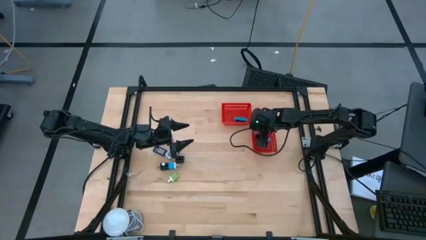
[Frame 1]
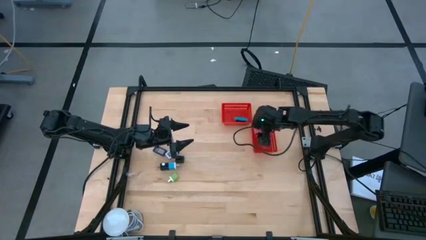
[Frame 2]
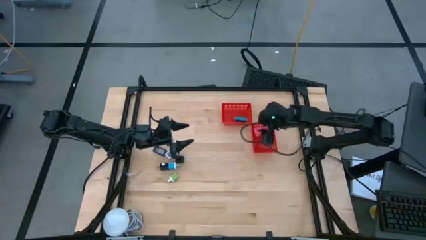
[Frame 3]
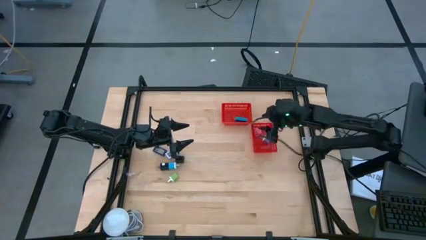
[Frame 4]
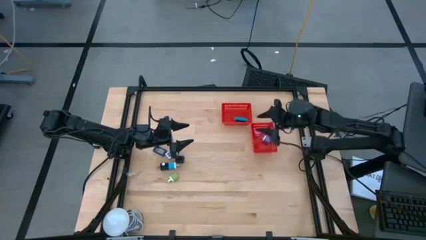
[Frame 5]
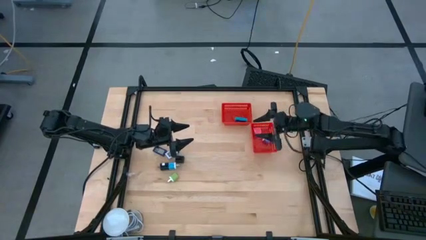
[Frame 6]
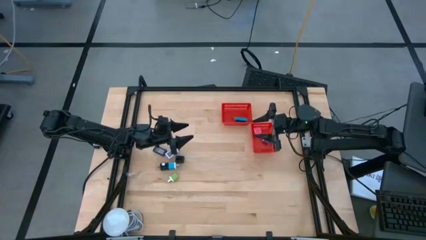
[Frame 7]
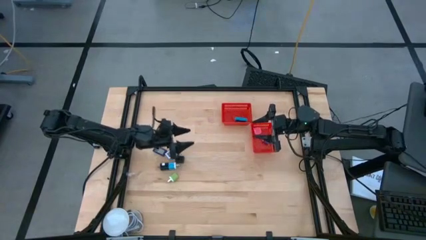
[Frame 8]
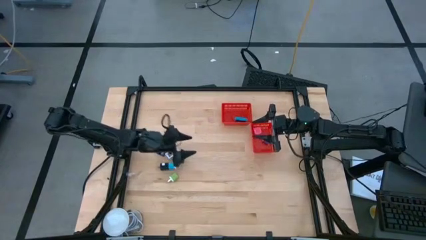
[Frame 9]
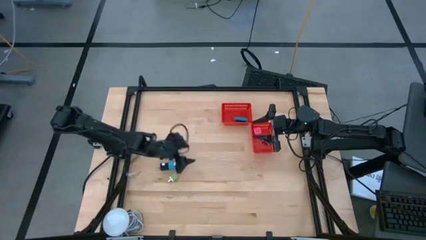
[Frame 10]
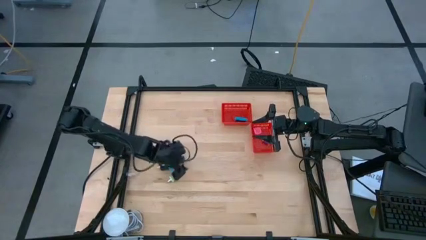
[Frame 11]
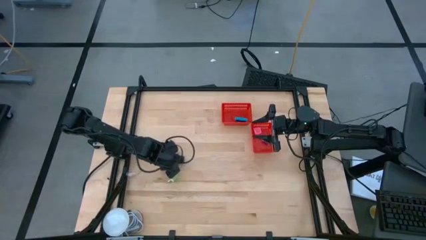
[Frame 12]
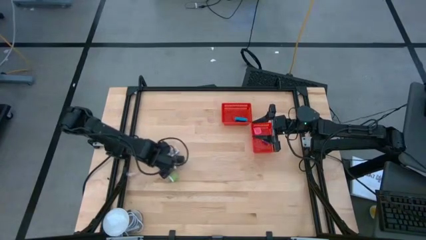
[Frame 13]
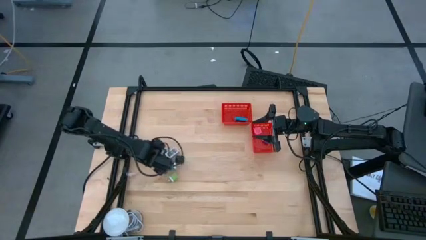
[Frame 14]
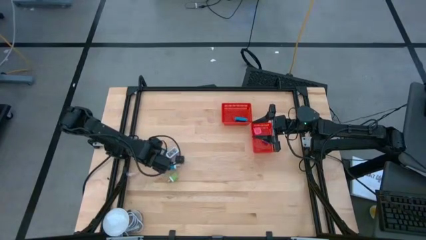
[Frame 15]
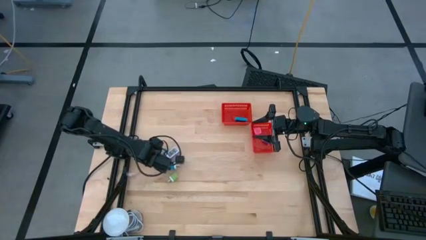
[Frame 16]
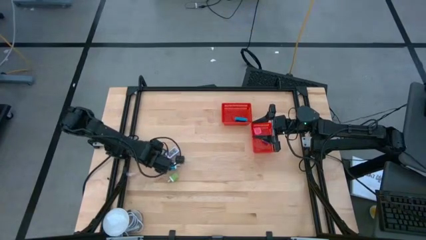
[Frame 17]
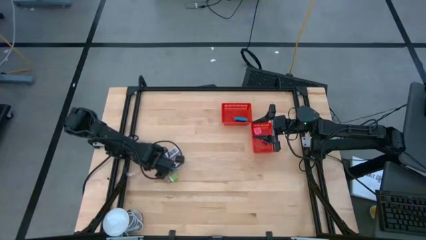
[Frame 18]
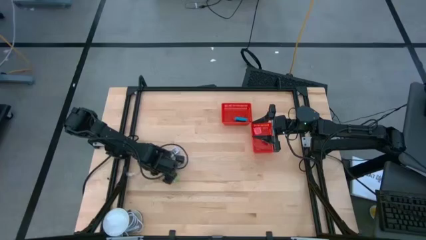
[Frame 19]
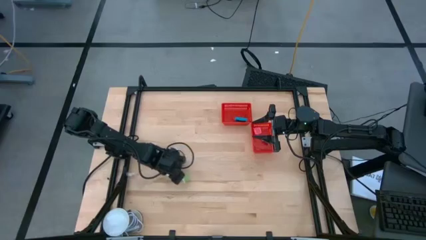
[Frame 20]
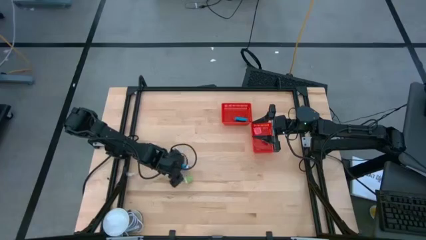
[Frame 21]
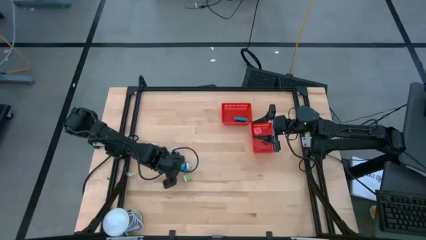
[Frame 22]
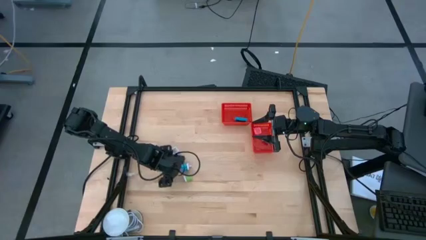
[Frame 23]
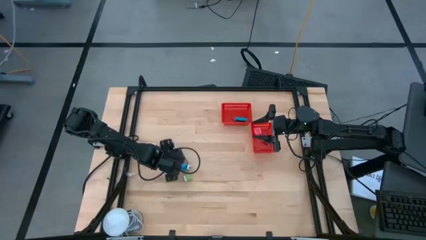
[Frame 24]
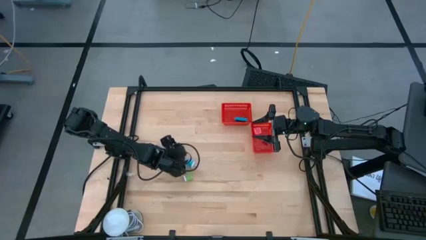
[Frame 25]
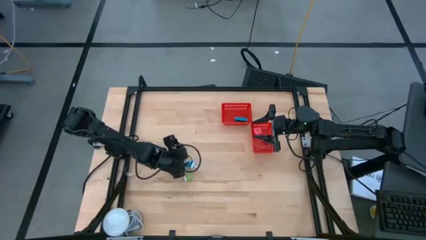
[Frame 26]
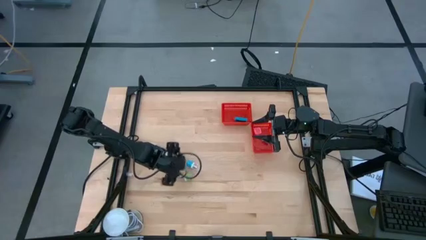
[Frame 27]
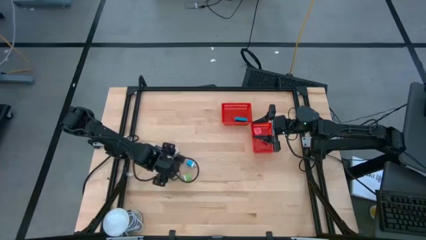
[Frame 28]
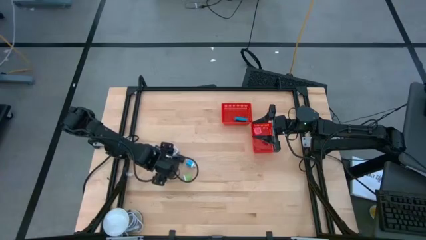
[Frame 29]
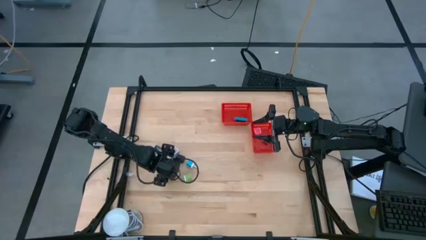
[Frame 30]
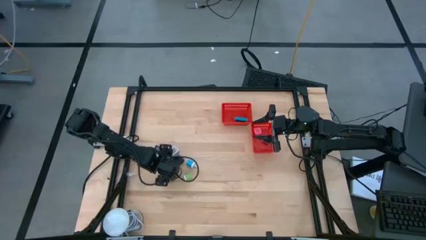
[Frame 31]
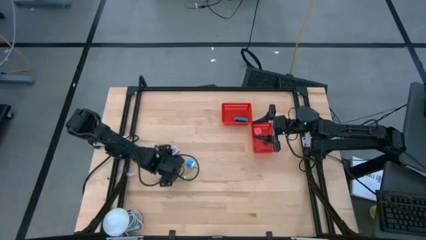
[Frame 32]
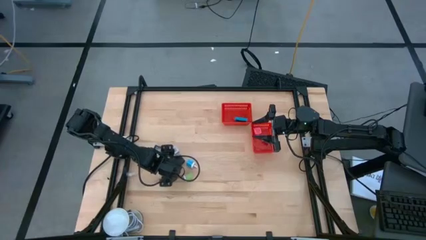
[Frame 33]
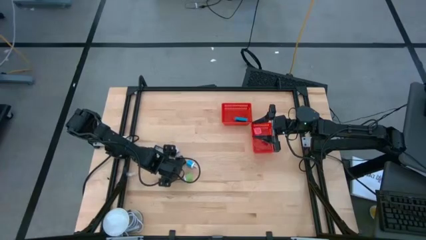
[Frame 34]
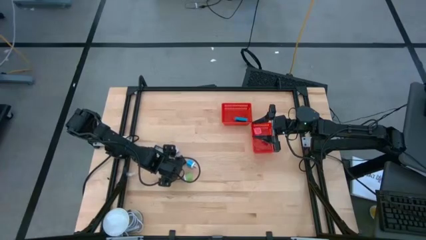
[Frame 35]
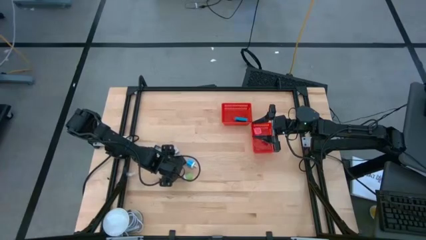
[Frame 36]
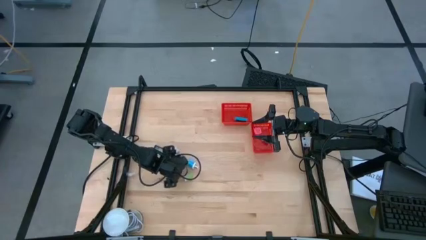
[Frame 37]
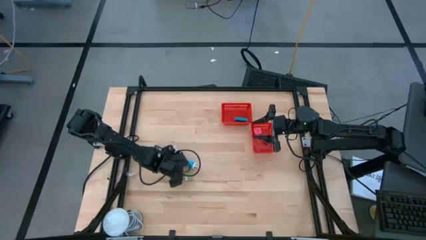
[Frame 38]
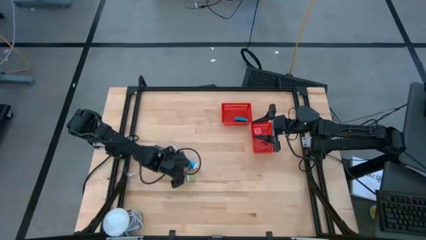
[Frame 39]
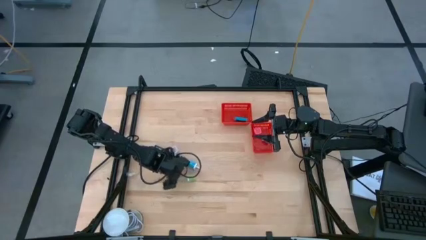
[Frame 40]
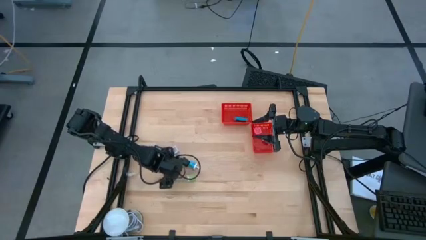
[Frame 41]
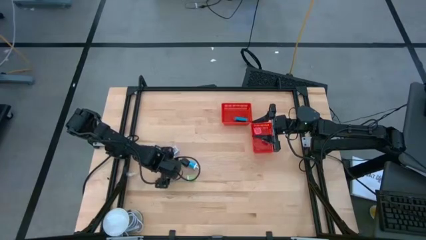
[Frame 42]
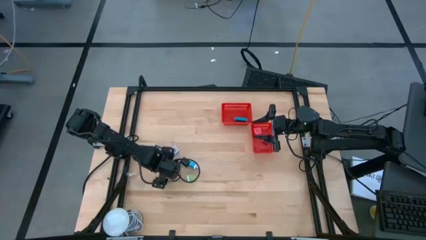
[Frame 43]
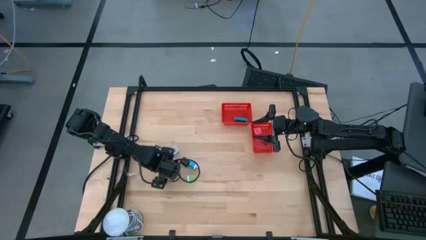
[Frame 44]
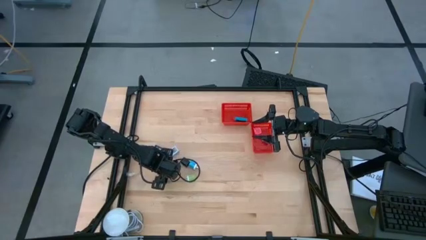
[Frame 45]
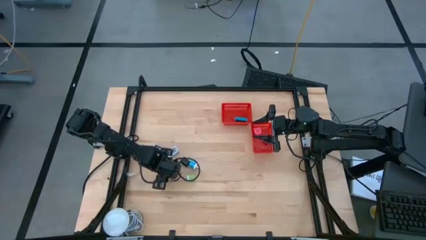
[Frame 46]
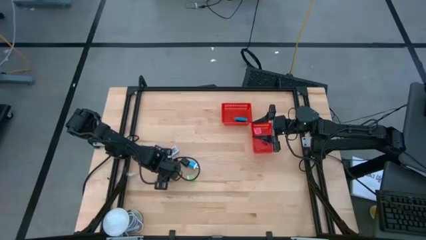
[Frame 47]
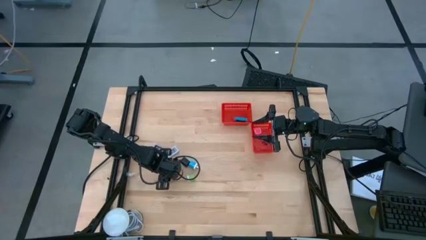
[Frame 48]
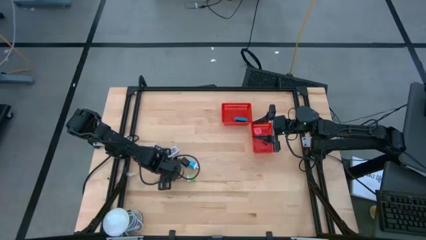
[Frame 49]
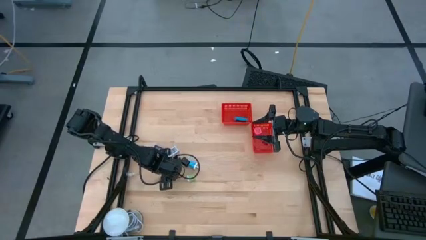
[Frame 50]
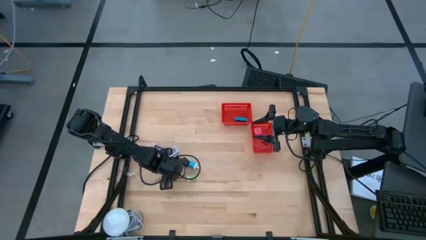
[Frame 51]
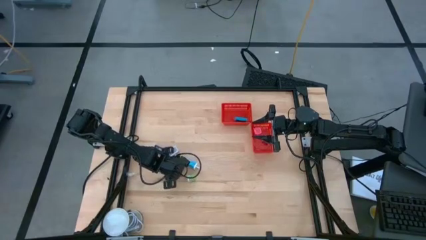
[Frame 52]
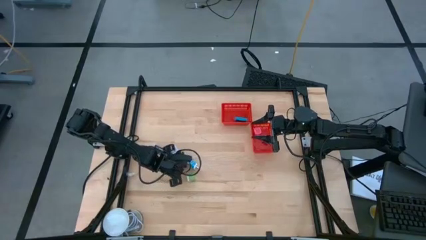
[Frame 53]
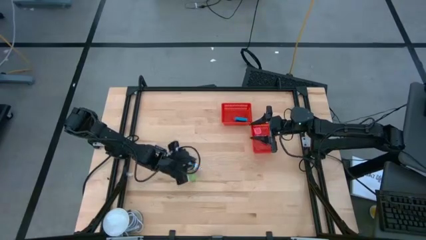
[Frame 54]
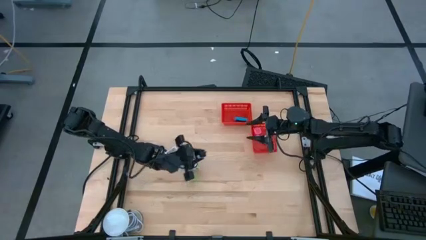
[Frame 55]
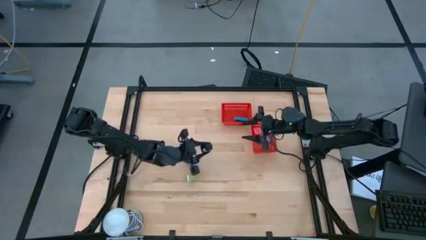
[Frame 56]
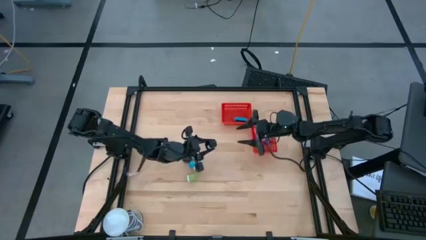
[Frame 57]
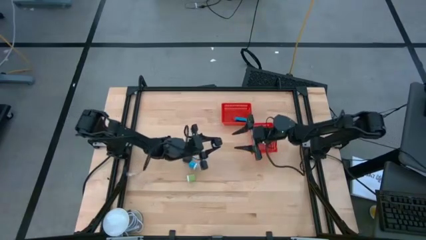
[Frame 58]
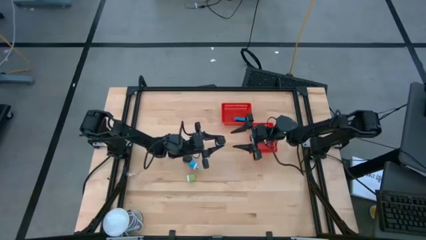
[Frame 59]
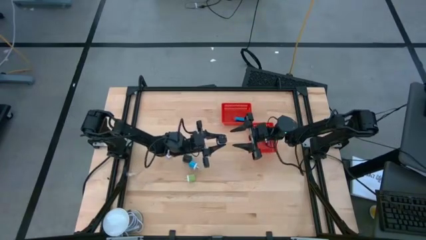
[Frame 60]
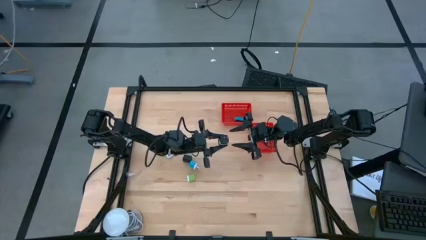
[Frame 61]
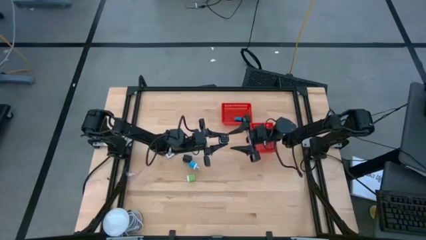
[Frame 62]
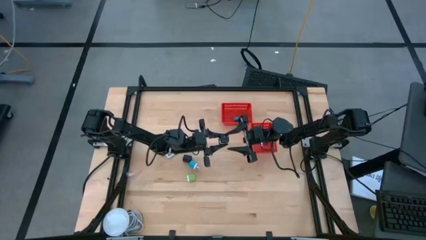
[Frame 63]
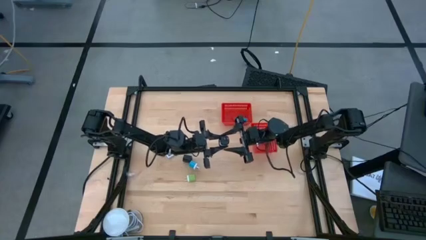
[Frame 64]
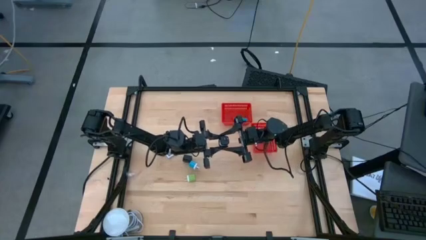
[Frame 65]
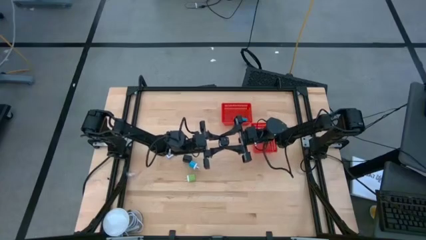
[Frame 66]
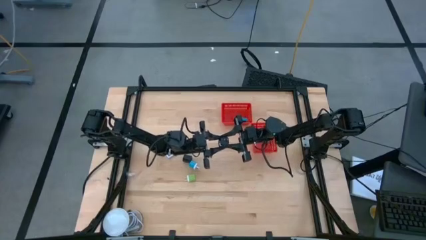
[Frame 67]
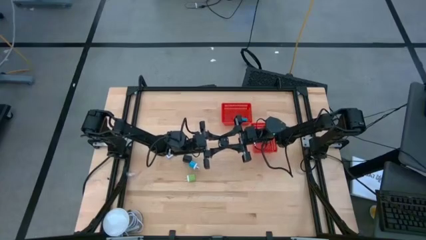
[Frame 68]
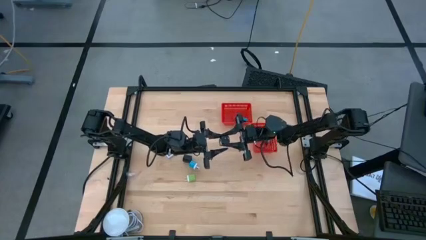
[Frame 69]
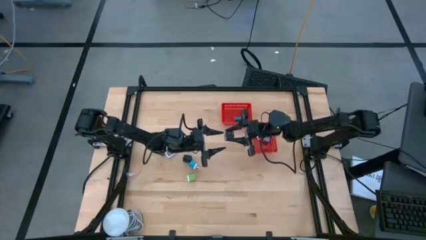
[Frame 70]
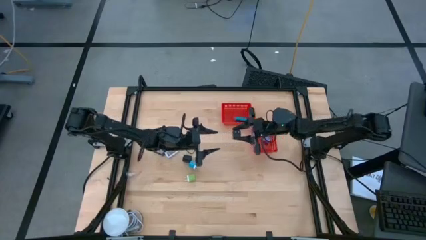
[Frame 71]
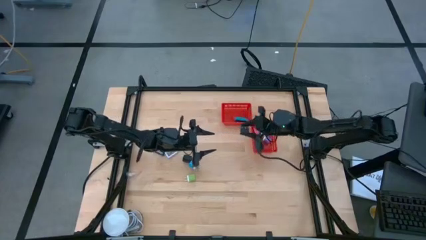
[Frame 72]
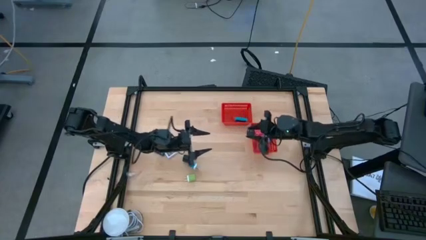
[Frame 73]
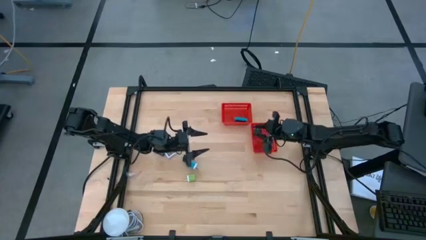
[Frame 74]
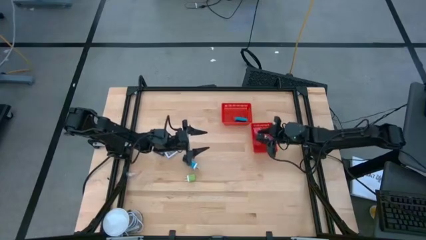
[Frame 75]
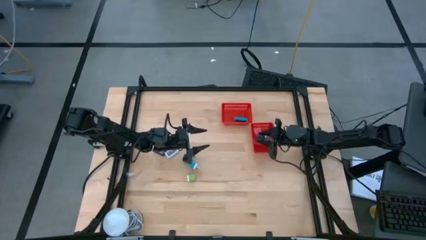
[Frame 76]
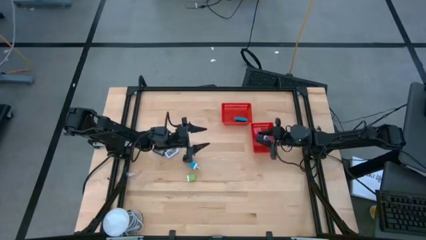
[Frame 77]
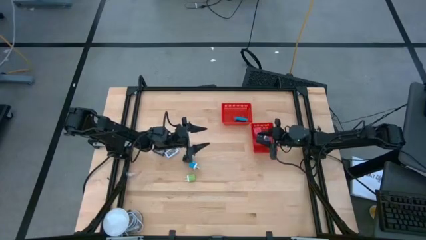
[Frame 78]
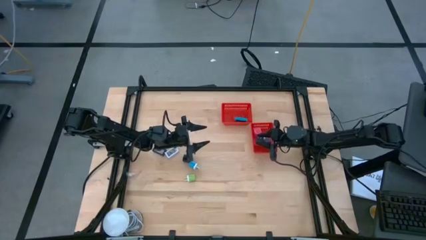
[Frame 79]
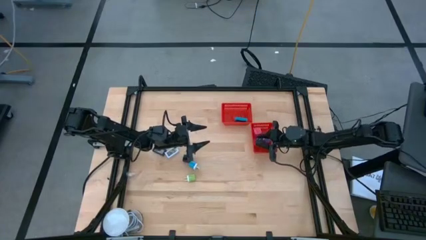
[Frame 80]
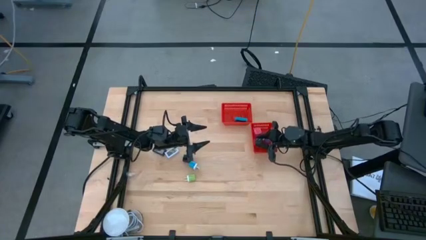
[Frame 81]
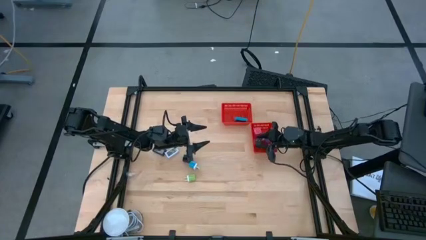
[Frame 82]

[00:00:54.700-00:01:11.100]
Task: Pick & Place Office items
Put the bottom black charger adapter into the bottom red bin
